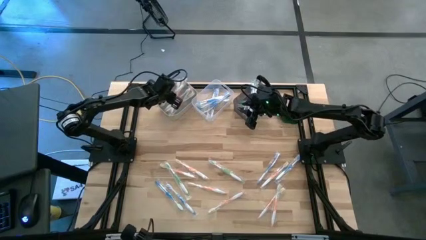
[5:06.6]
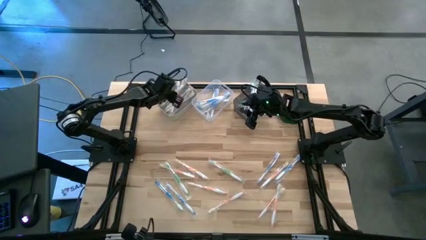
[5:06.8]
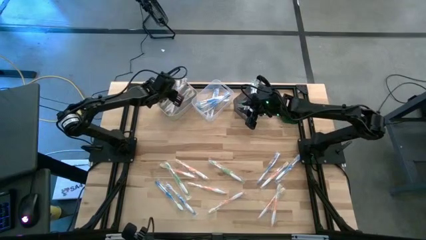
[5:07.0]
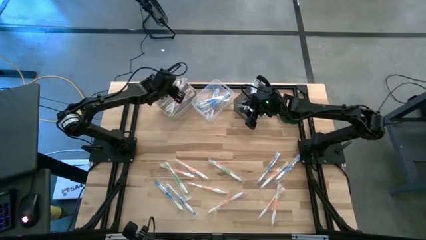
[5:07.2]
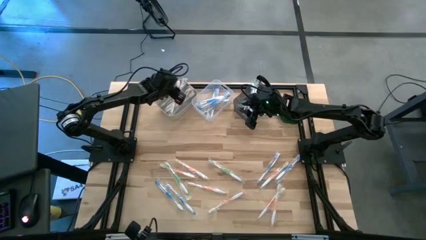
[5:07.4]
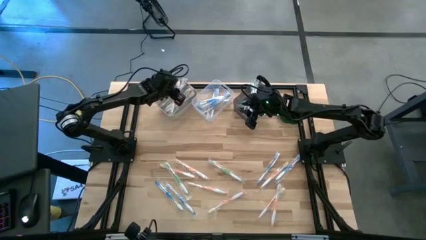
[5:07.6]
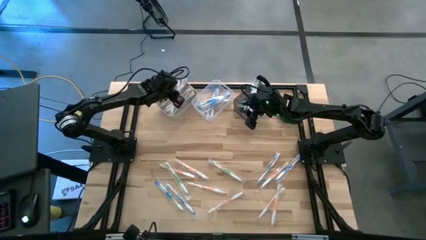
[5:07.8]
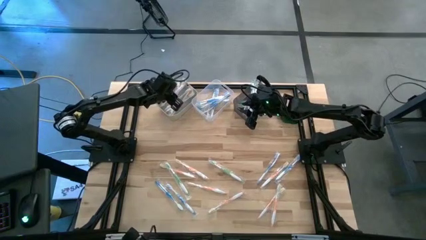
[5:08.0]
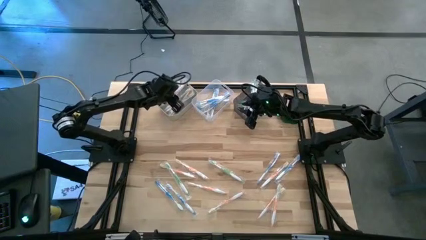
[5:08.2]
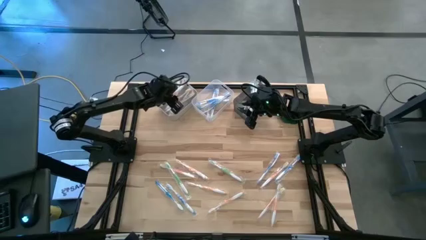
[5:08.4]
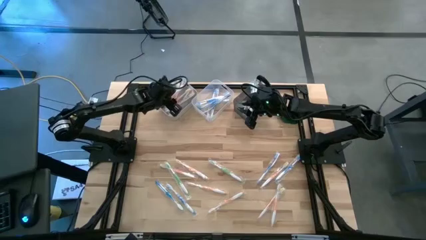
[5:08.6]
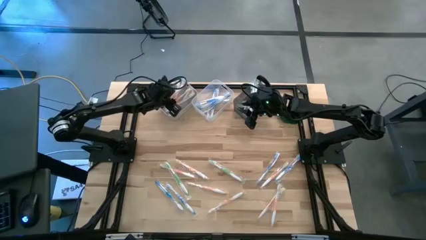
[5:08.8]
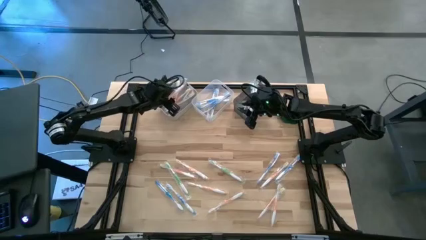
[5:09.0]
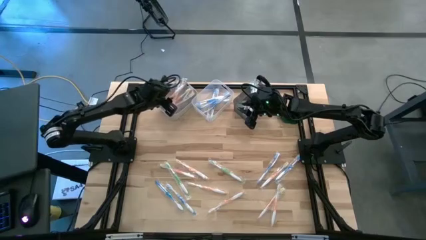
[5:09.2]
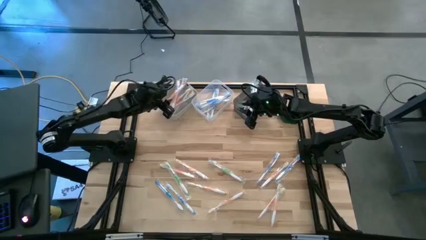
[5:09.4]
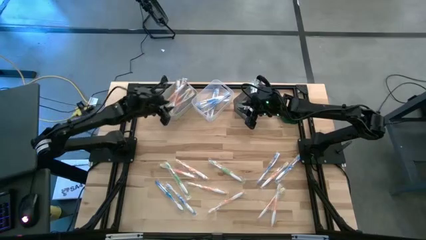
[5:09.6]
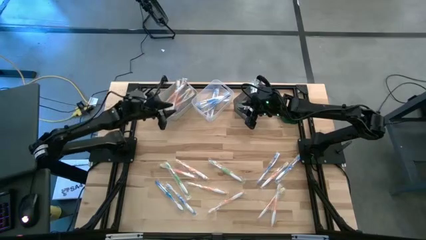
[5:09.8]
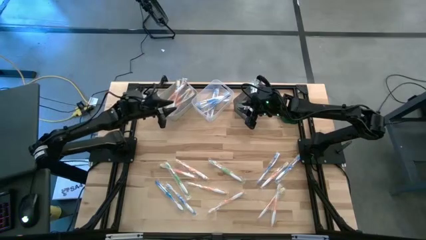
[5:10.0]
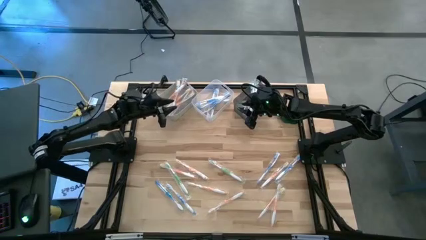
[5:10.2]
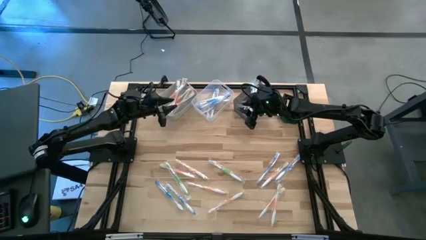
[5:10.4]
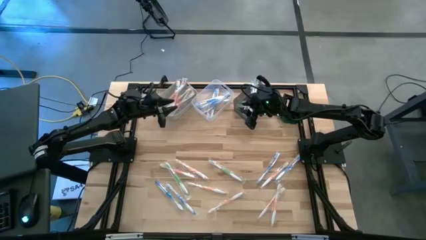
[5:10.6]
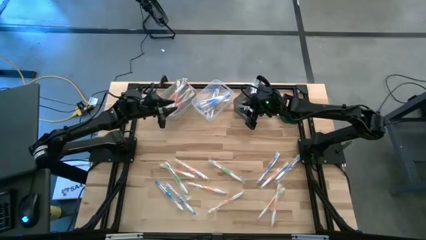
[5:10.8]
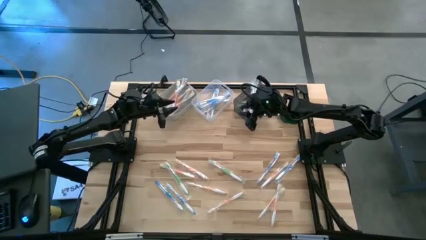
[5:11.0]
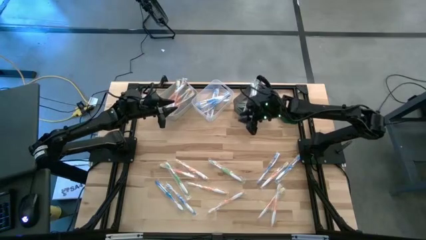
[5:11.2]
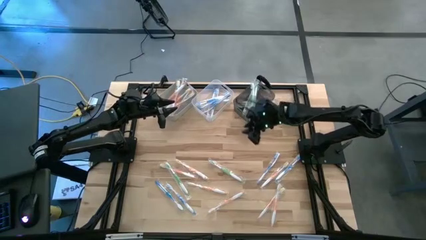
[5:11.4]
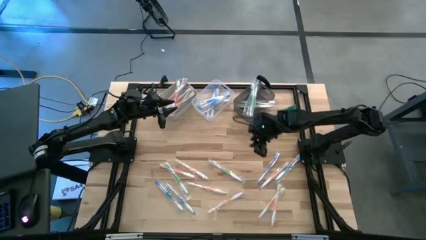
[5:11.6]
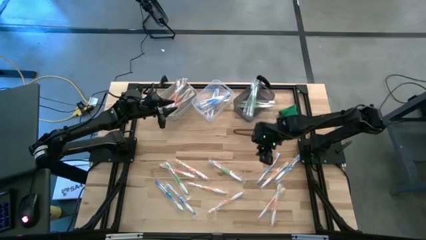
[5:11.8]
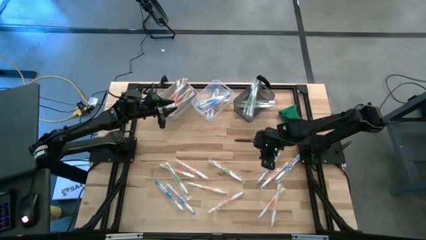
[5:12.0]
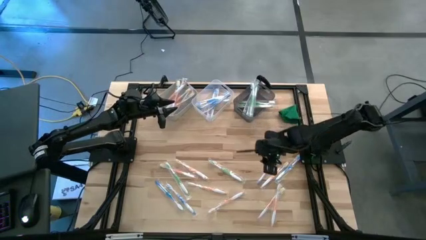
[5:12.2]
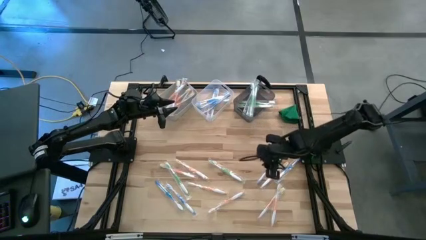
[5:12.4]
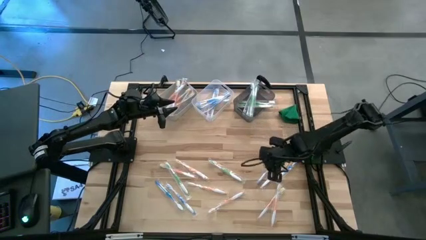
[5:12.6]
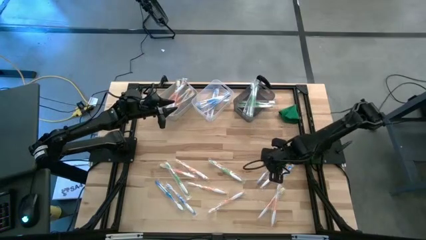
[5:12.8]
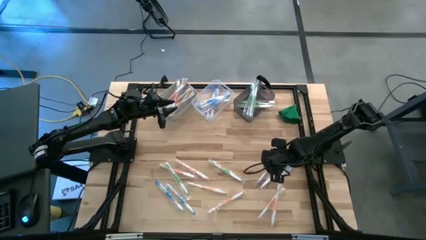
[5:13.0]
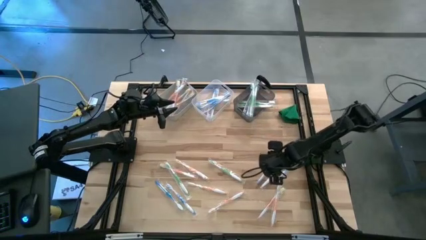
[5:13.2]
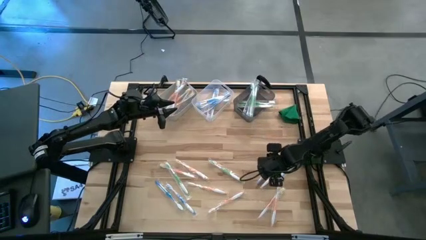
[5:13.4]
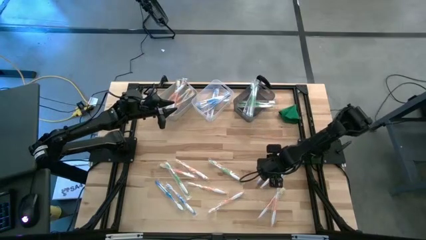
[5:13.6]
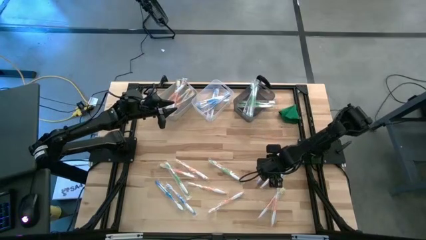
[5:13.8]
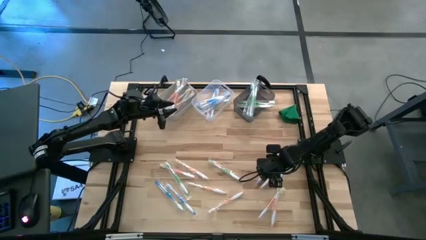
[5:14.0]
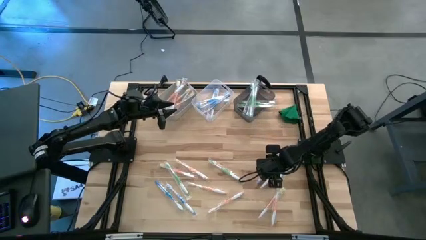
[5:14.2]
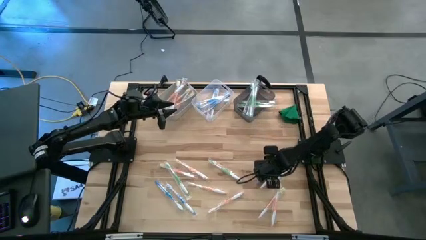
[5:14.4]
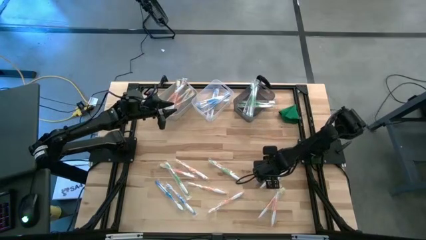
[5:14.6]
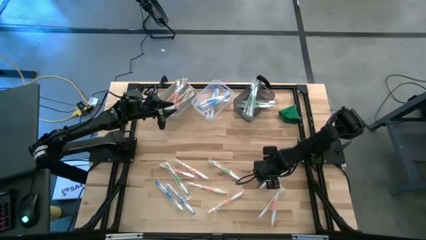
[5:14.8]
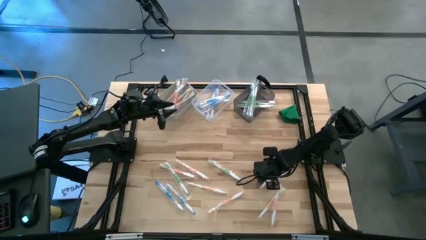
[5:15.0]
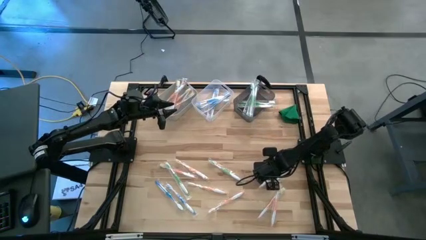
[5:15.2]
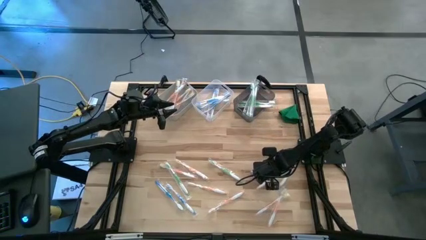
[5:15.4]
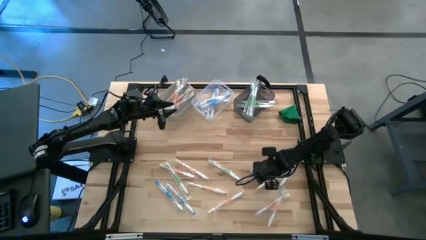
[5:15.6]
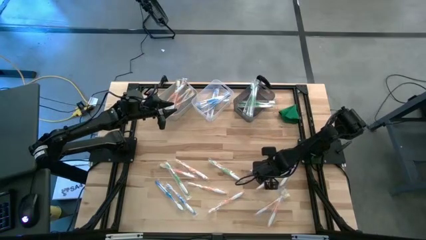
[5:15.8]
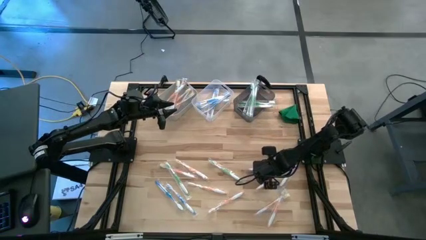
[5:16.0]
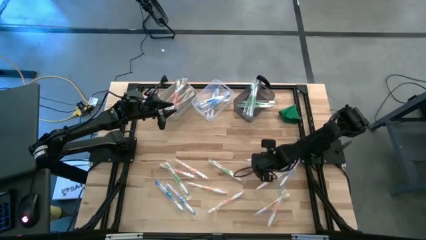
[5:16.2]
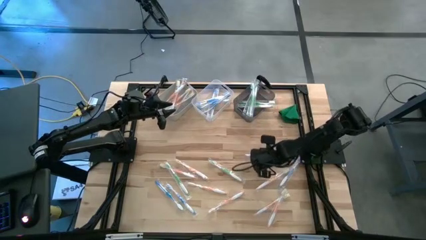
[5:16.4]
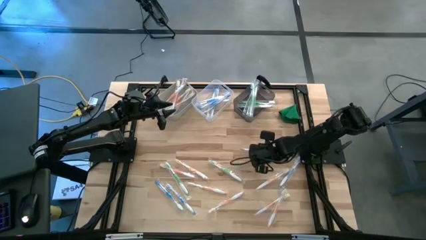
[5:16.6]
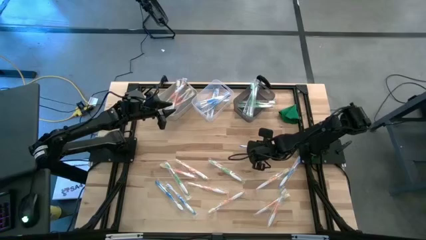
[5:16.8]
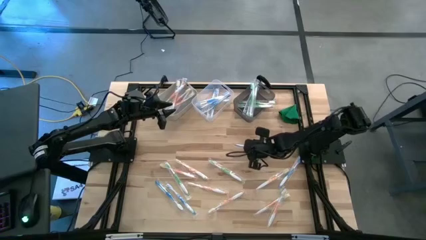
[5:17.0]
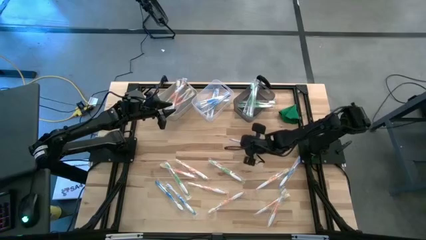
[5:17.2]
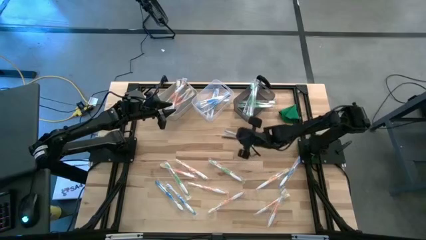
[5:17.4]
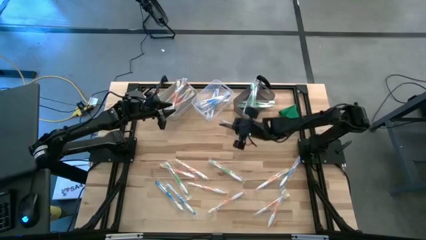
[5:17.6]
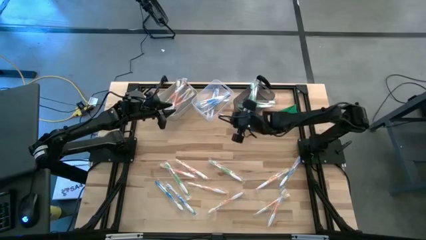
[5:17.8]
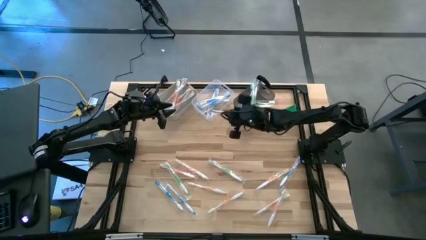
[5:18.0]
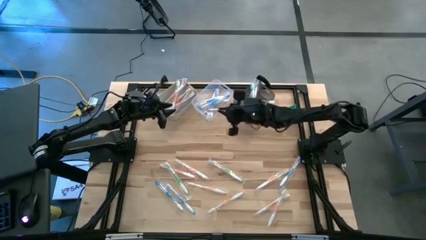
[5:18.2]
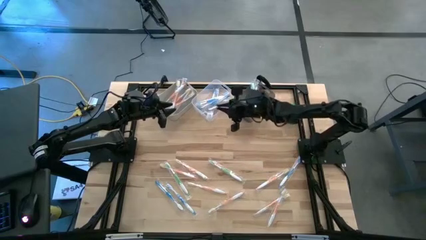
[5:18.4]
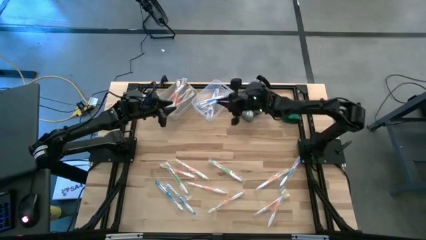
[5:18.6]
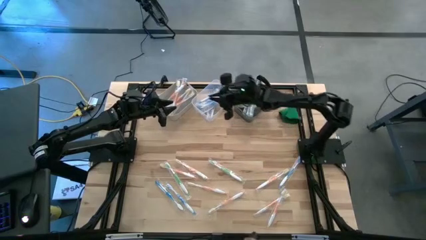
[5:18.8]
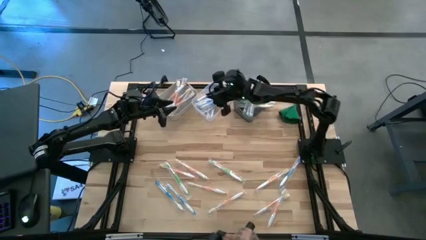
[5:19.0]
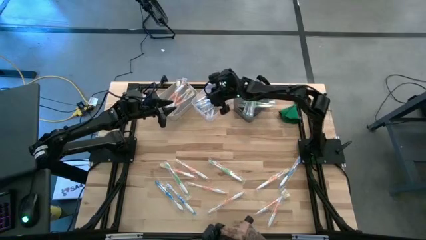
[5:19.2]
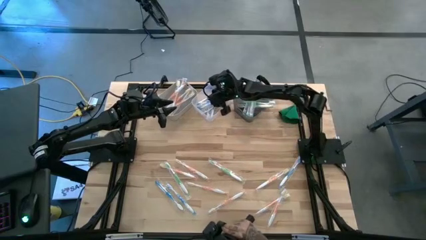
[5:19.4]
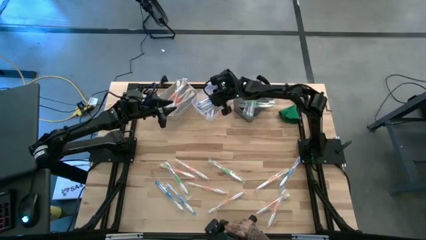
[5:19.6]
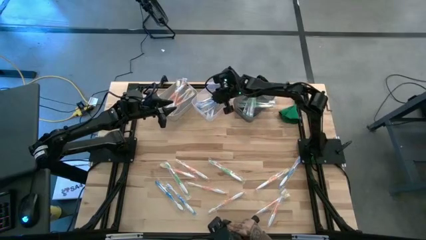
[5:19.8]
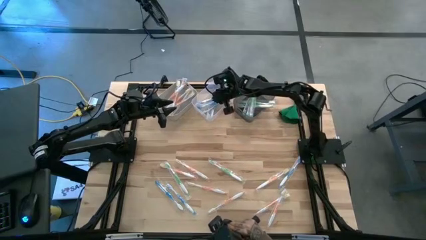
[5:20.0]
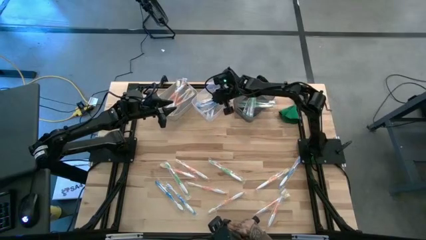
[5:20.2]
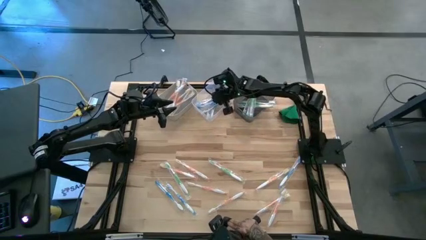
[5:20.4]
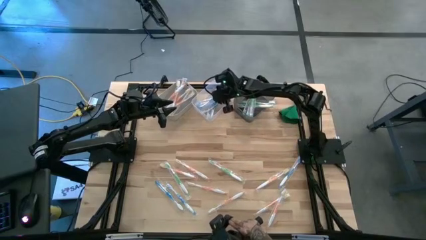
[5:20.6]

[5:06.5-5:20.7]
Task: Pick & Place Toothbrushes
Put the blue toothbrush into the transparent bin

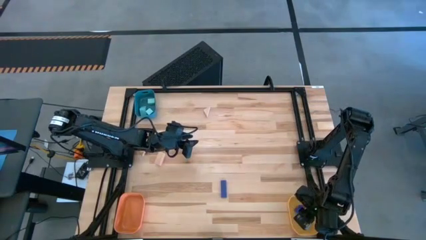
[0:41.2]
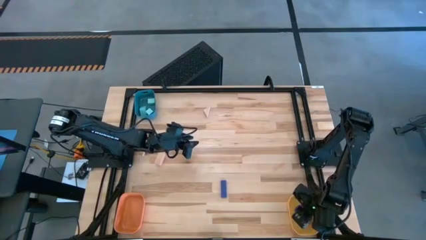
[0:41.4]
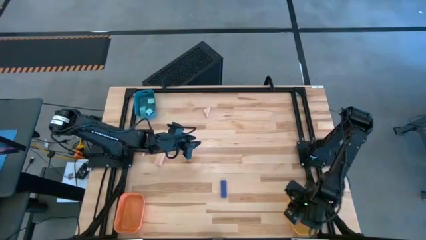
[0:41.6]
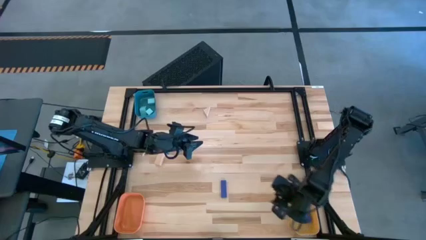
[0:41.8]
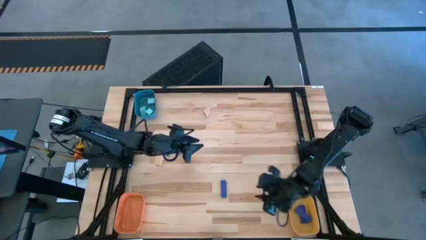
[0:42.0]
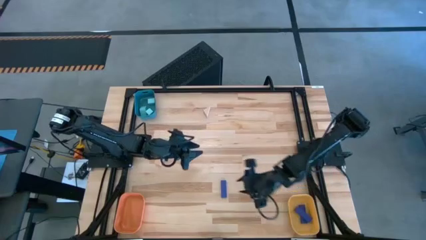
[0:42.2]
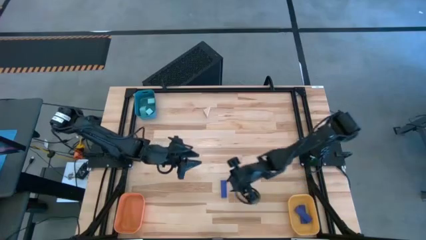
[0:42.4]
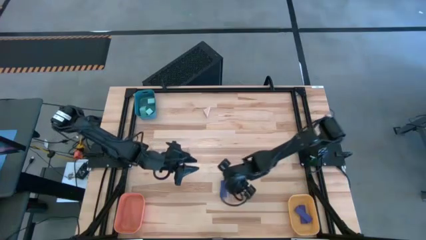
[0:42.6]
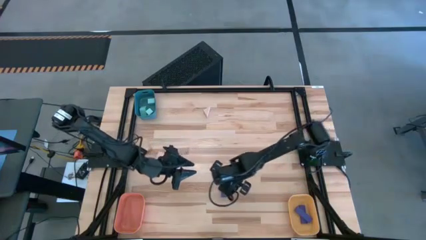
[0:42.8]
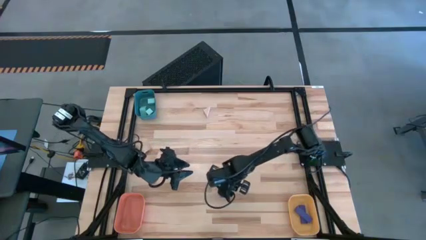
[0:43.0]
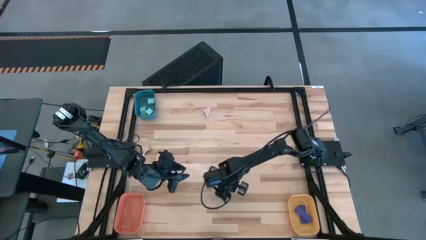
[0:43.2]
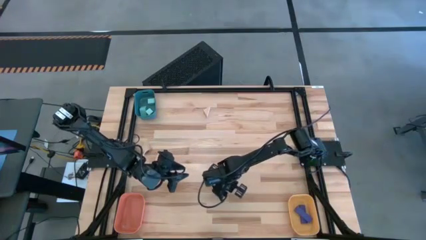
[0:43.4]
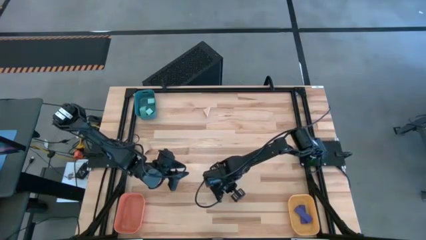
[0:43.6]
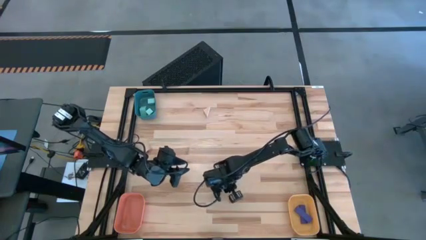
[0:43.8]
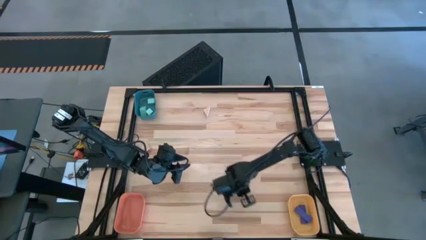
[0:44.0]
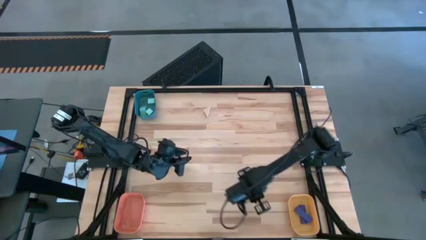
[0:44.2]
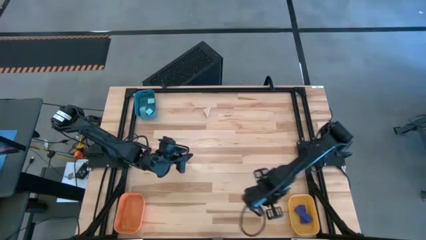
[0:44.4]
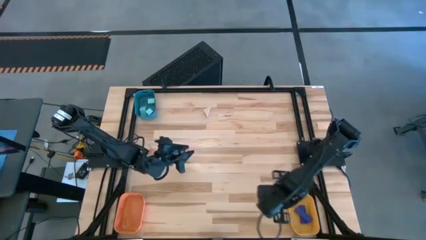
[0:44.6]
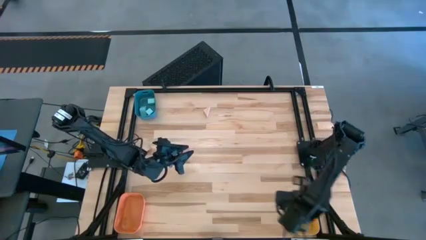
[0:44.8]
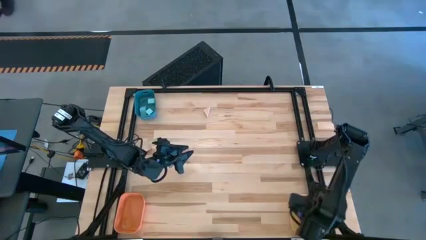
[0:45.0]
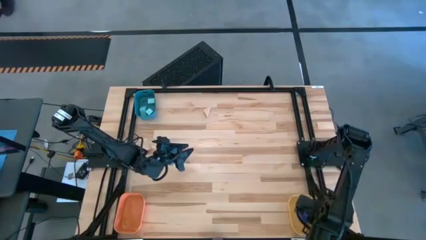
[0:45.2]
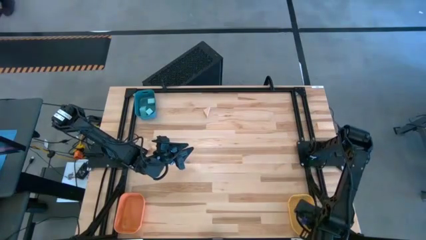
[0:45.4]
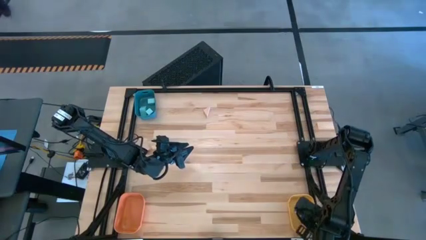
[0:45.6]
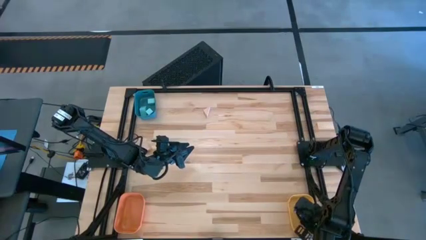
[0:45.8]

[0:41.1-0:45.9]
Task: Sort & place blocks by color
Put the blue block into the yellow bin
